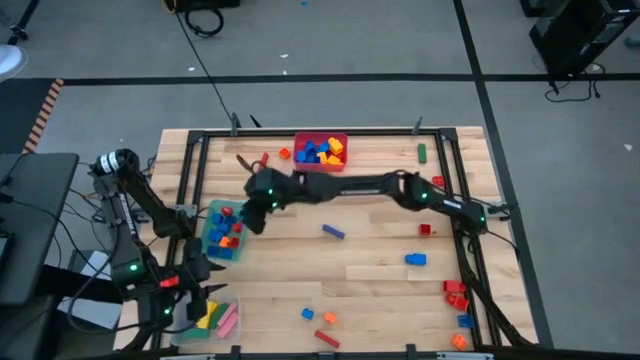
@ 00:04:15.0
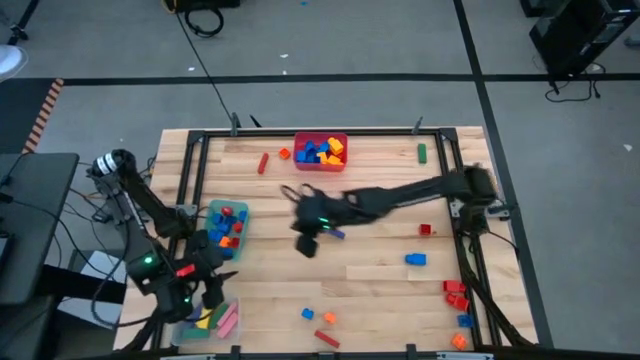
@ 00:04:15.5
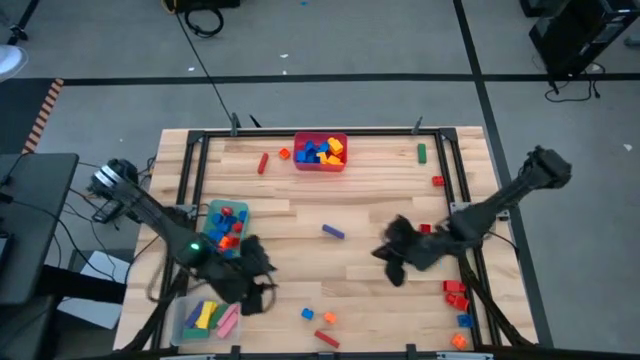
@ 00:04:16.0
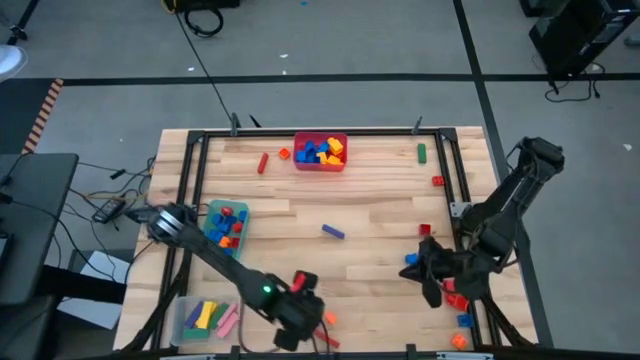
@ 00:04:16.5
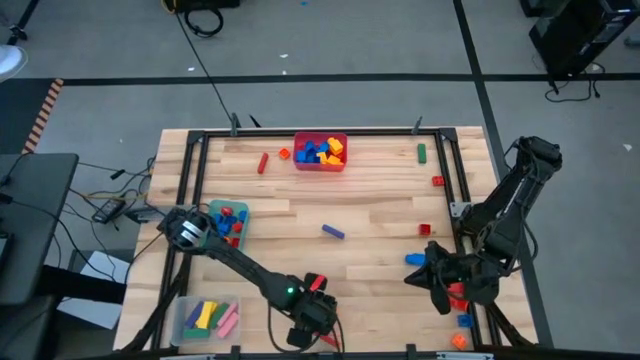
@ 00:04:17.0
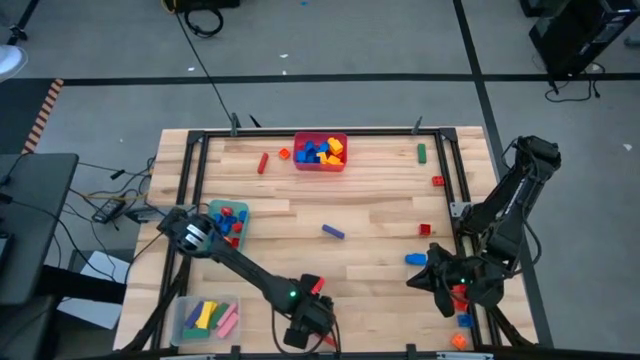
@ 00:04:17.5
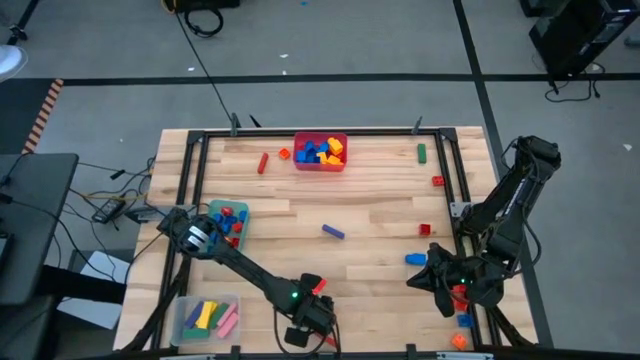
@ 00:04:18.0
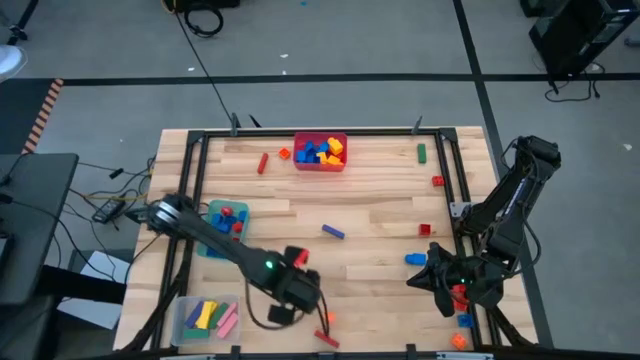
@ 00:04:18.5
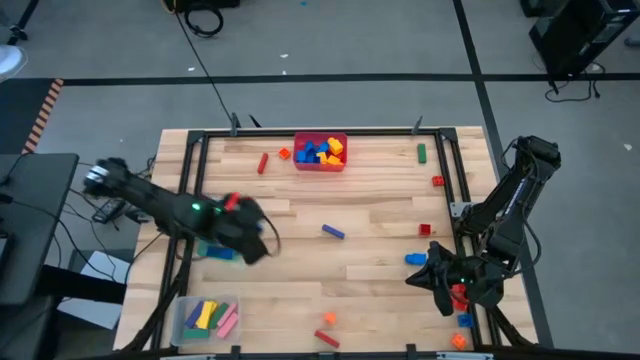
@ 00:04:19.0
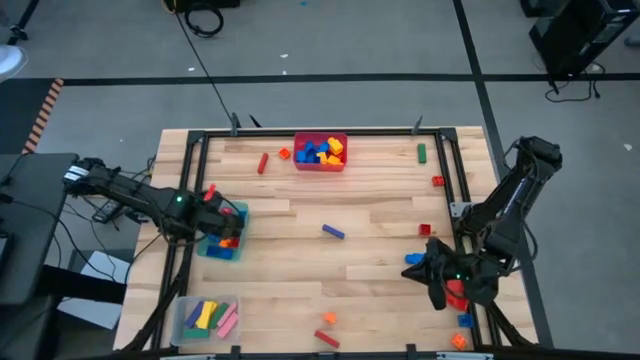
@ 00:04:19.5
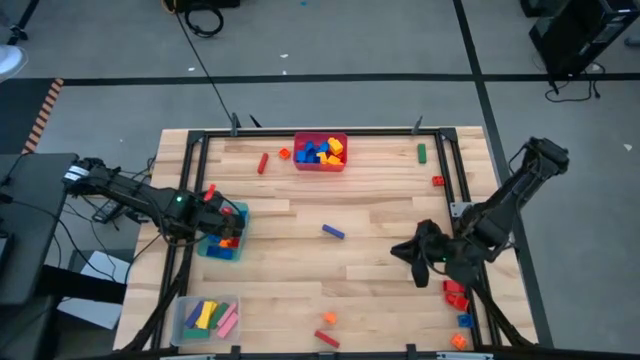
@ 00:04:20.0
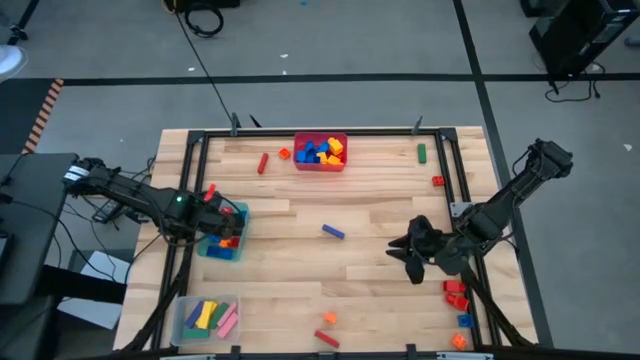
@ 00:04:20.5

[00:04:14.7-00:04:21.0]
Task: Sort blocks by size
Put the blue 4 studded building block into the teal bin

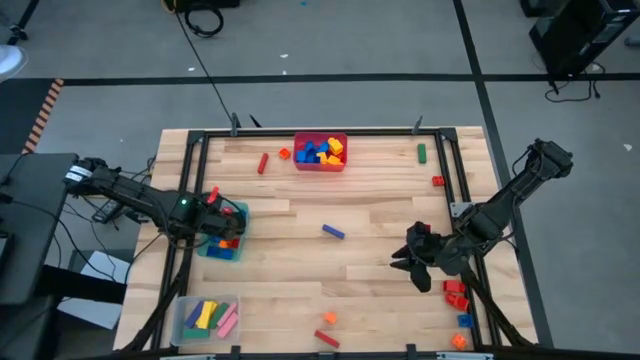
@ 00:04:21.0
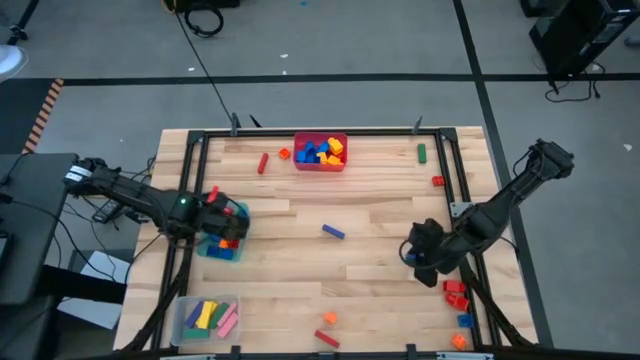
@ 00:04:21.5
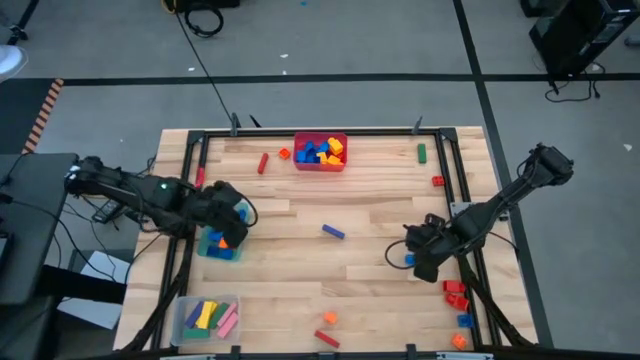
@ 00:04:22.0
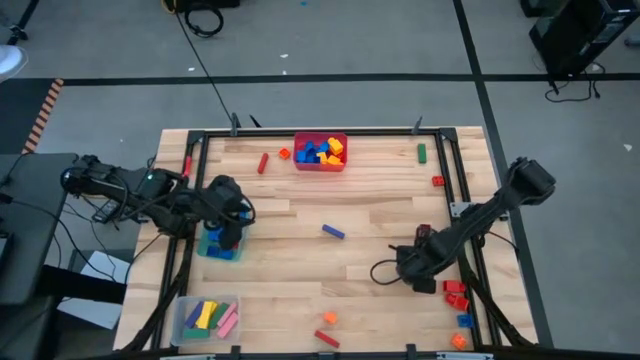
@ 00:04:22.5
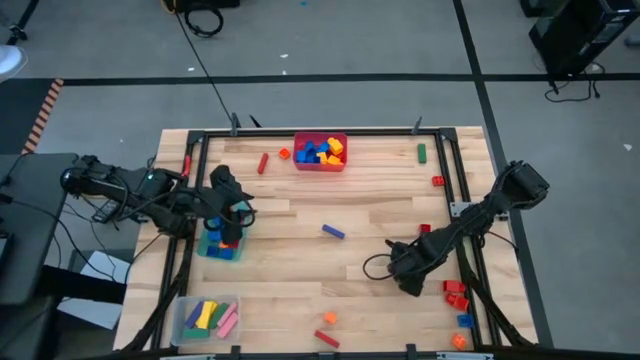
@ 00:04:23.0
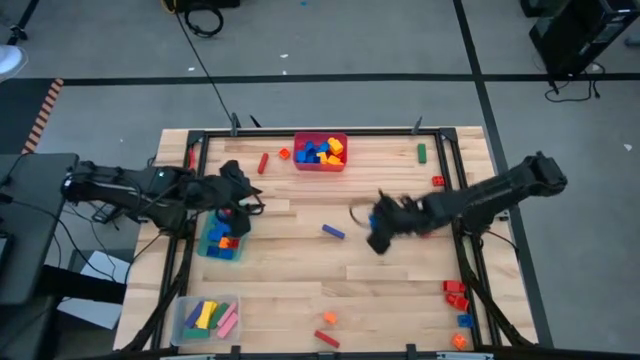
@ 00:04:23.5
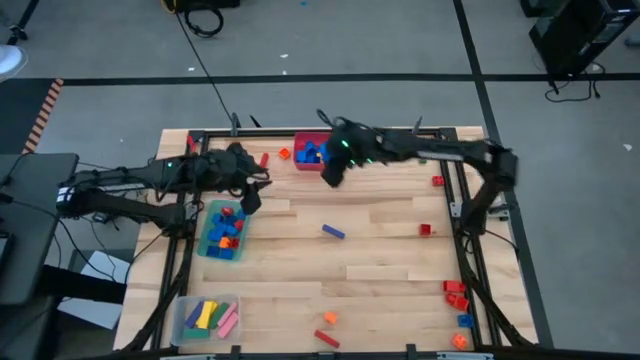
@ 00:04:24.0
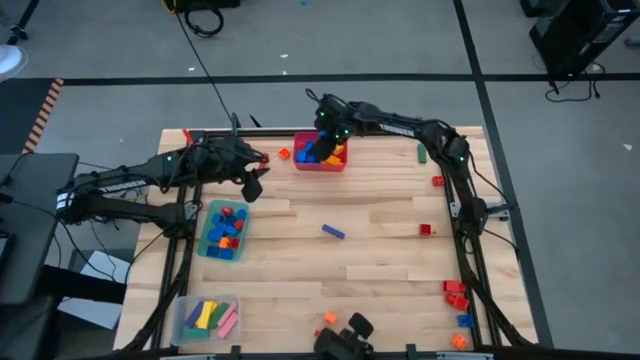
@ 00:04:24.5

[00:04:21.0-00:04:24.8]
Put the blue 1 studded building block into the red bin

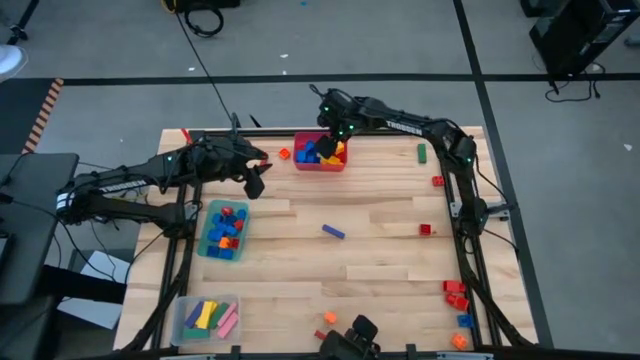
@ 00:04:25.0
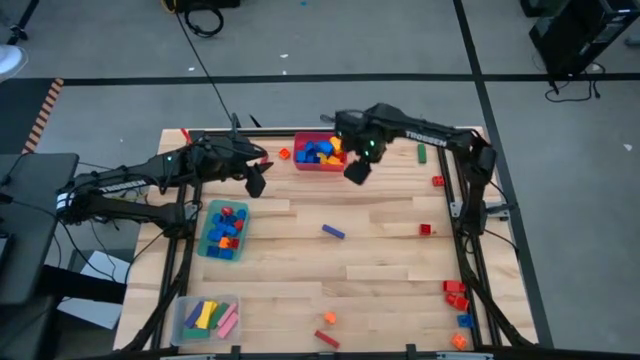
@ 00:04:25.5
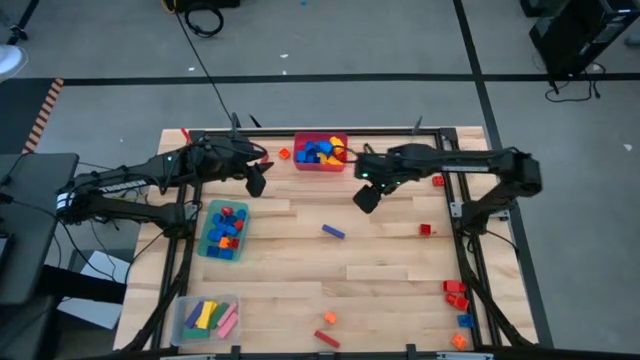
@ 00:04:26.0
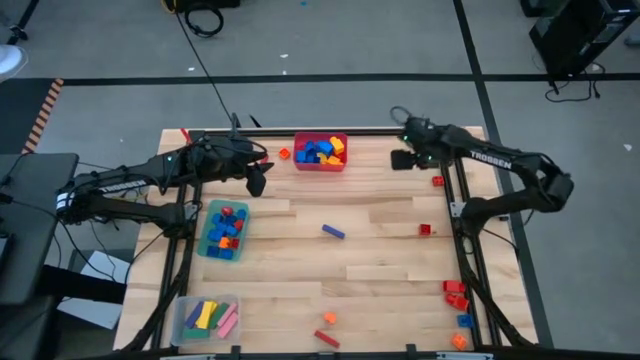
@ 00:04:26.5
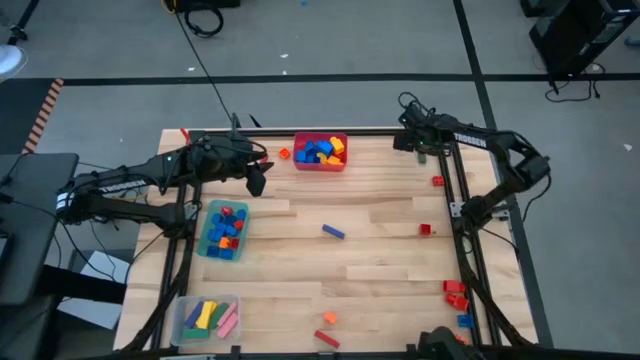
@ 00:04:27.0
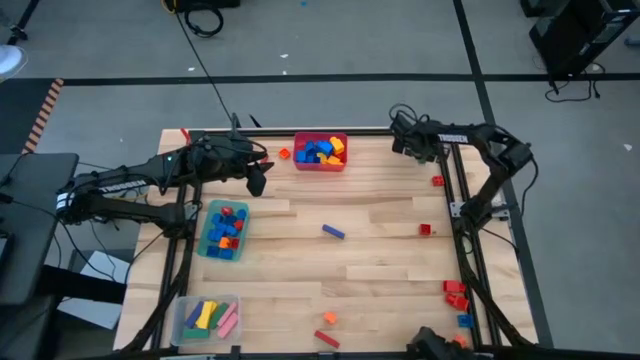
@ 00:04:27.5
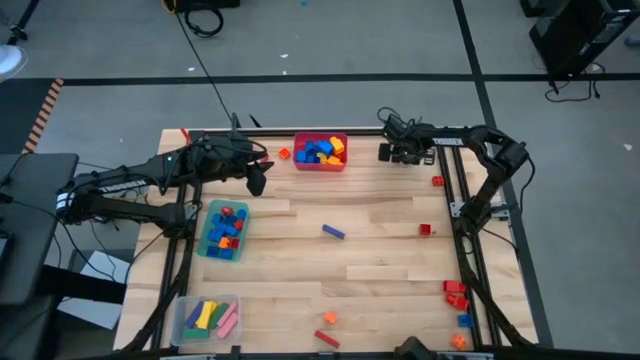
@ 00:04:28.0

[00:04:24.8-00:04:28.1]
Put the green rectangle block into the transparent bin

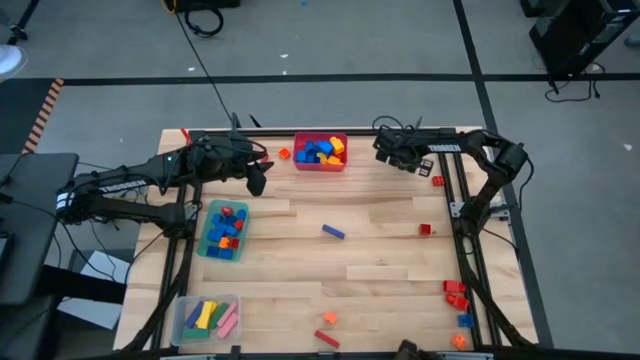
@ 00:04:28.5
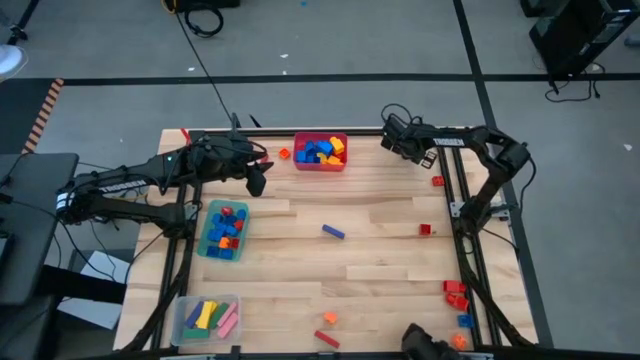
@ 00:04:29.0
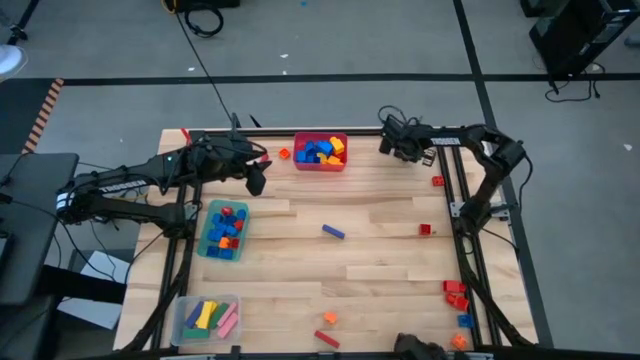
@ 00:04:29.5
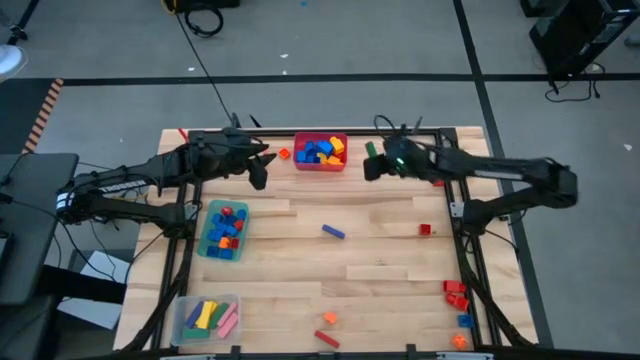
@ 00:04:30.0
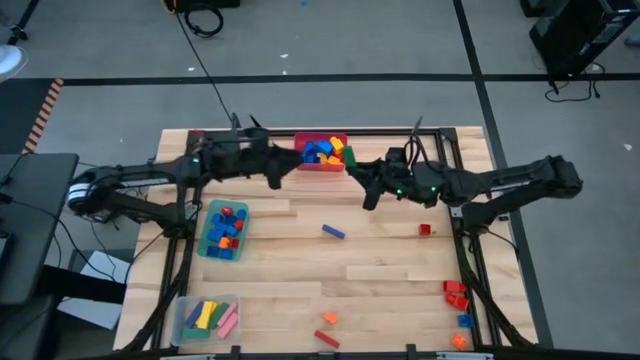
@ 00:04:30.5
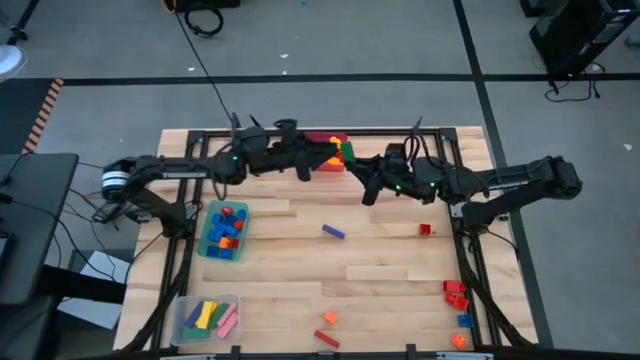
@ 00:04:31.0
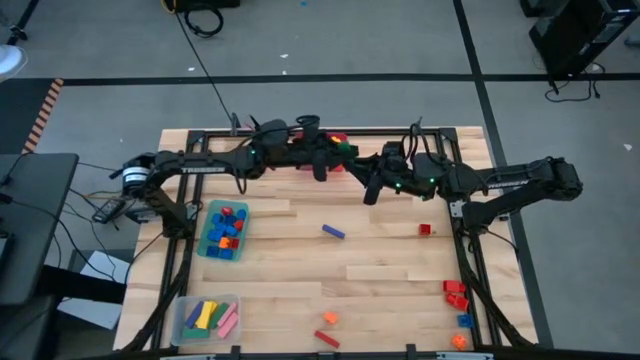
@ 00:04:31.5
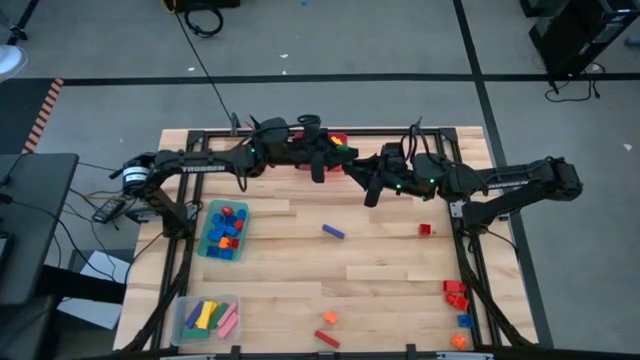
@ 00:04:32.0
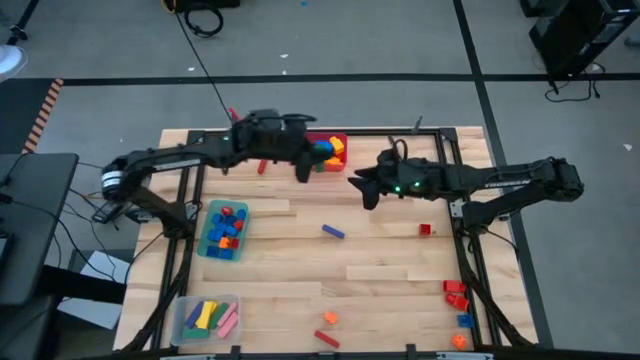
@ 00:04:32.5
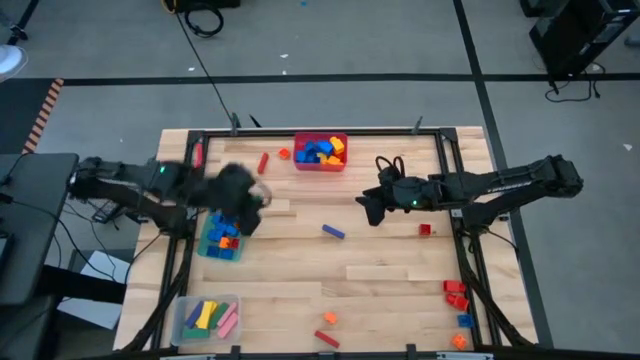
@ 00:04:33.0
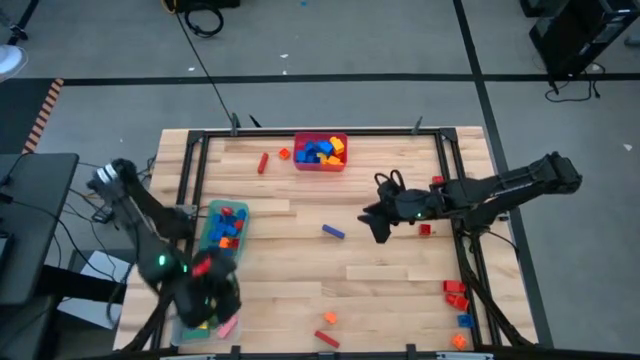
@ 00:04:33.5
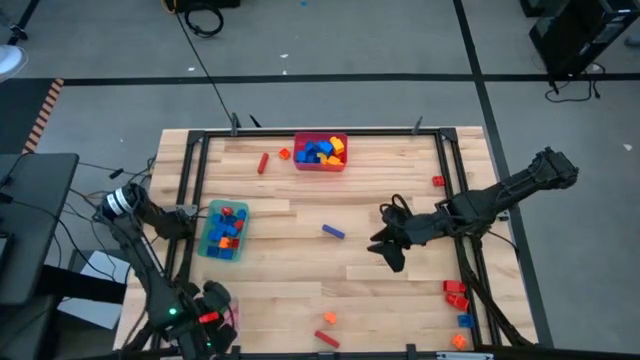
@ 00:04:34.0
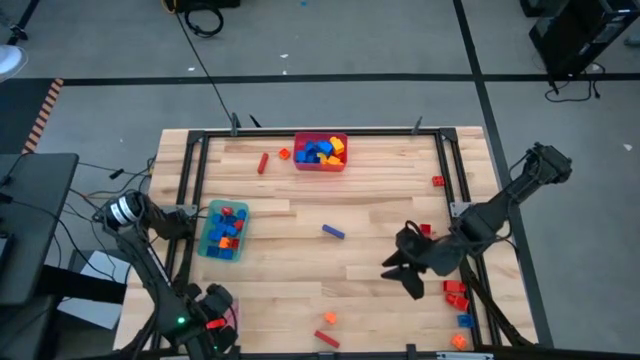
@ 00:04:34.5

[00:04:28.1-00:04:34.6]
Put the green rectangle block into the transparent bin

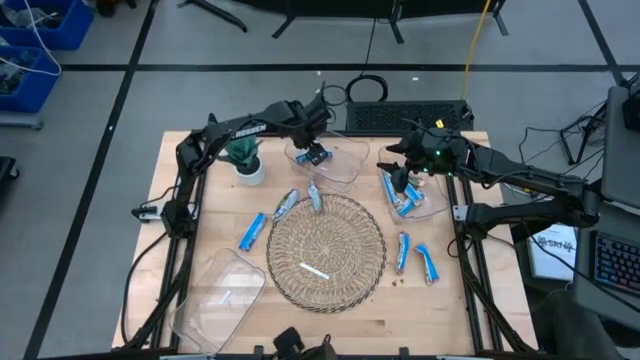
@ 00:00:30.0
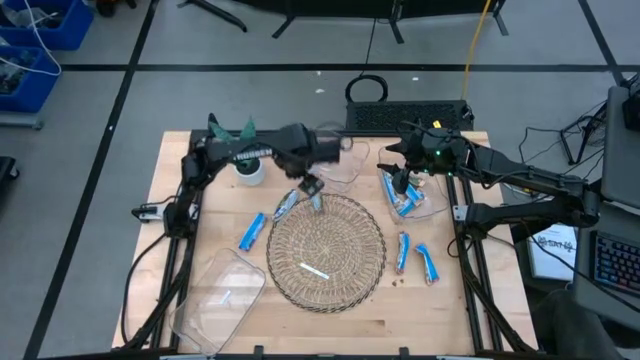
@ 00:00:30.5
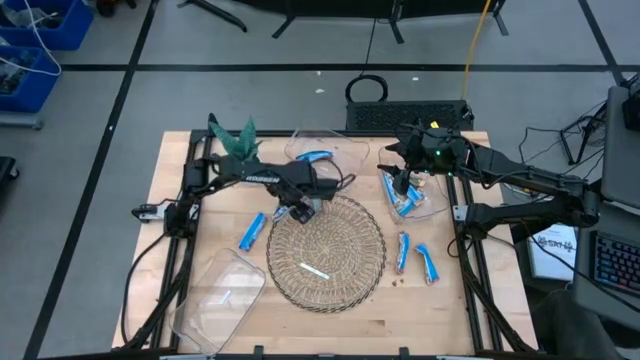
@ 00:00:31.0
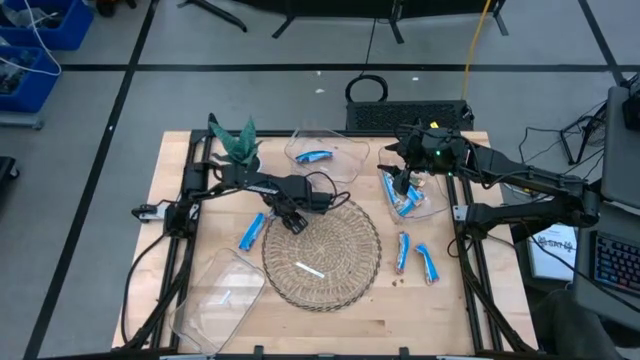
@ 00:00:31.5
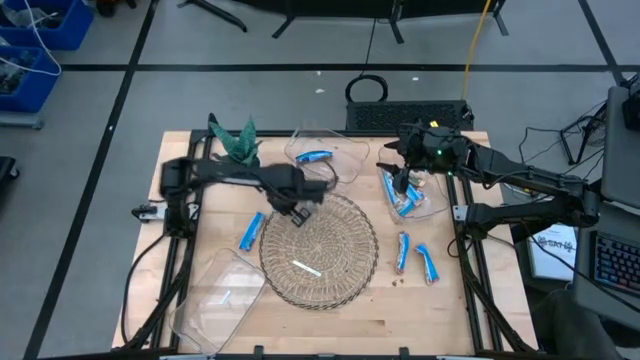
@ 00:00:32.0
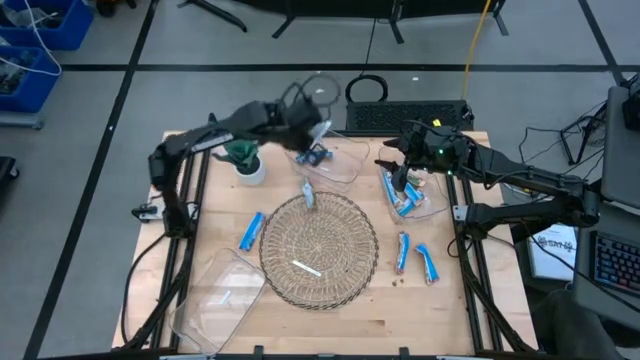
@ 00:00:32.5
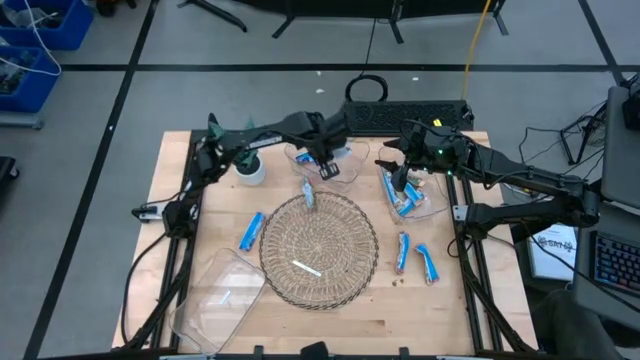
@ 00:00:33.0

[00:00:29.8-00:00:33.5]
Task: Pick and place Granola Bars by type
Put the top blue granola bar into the top left transparent bin
